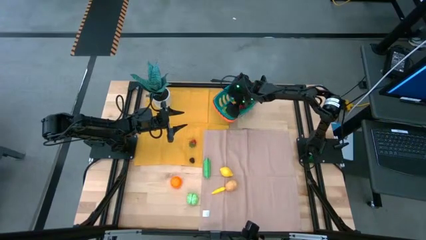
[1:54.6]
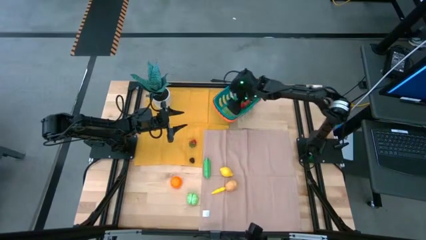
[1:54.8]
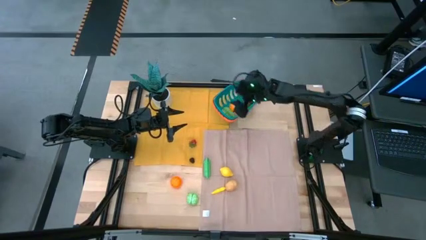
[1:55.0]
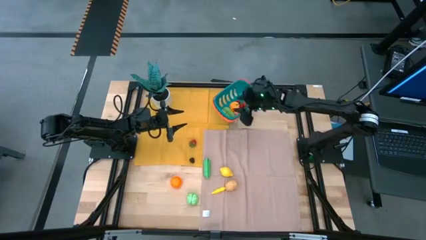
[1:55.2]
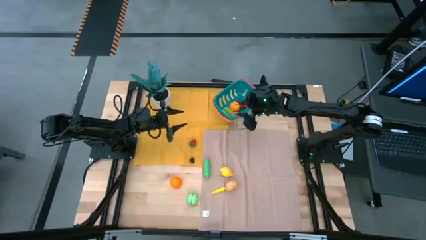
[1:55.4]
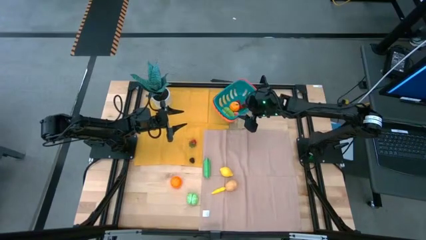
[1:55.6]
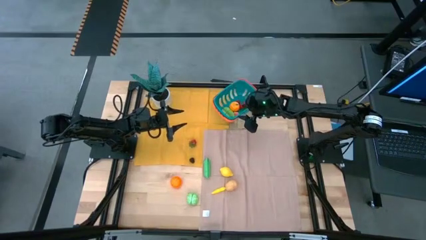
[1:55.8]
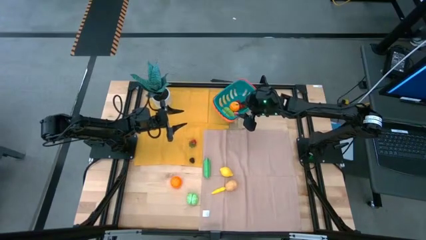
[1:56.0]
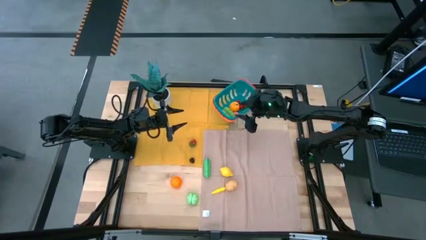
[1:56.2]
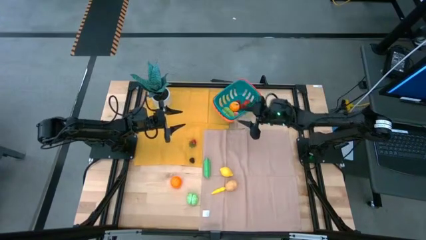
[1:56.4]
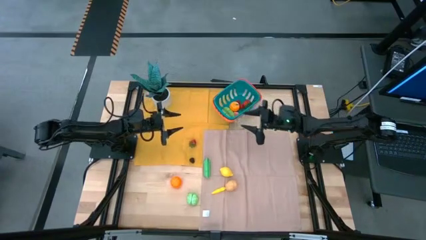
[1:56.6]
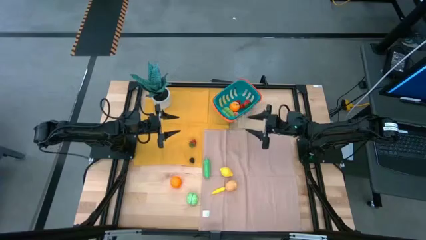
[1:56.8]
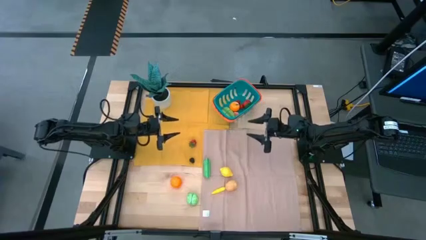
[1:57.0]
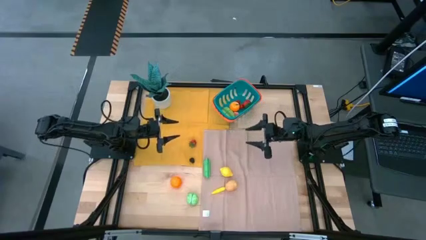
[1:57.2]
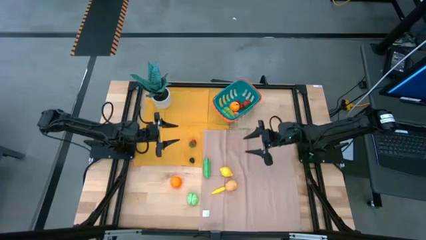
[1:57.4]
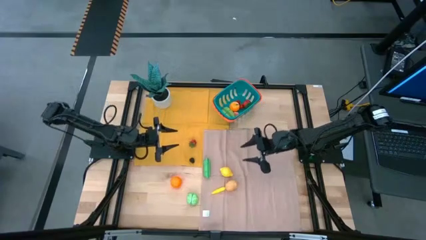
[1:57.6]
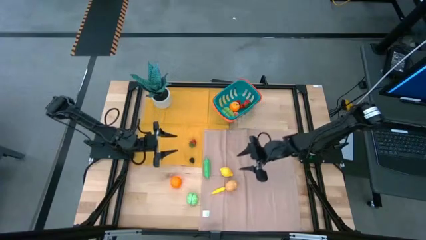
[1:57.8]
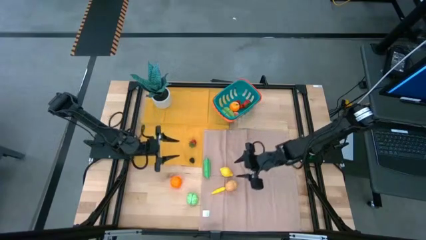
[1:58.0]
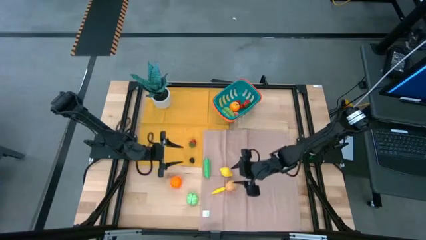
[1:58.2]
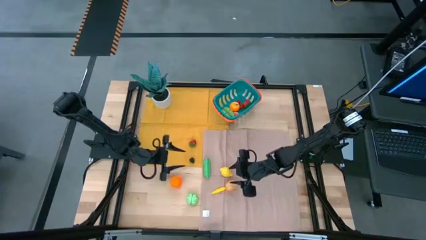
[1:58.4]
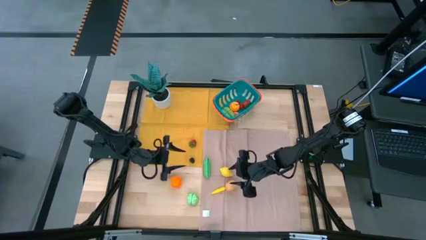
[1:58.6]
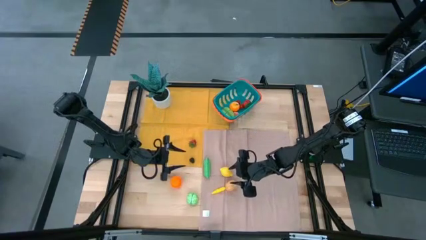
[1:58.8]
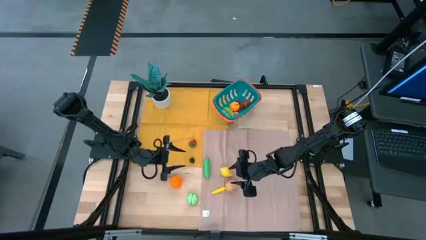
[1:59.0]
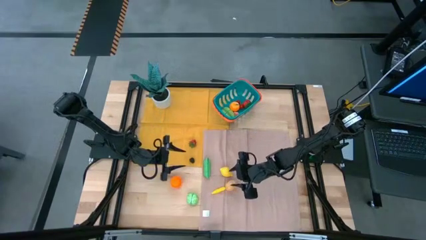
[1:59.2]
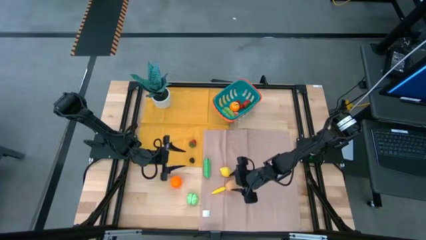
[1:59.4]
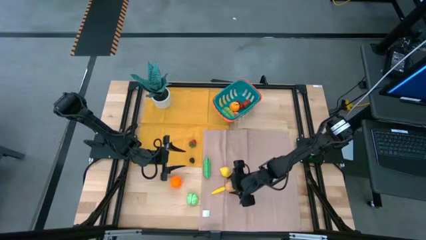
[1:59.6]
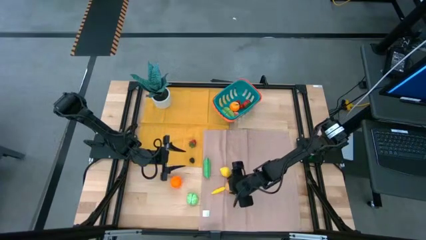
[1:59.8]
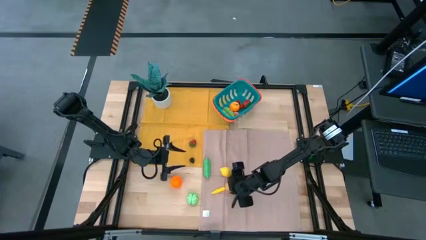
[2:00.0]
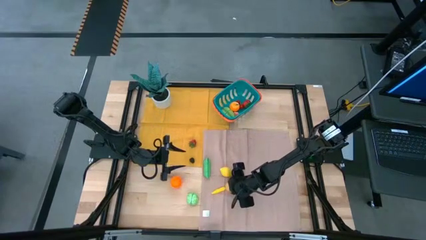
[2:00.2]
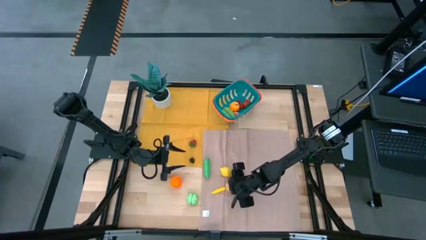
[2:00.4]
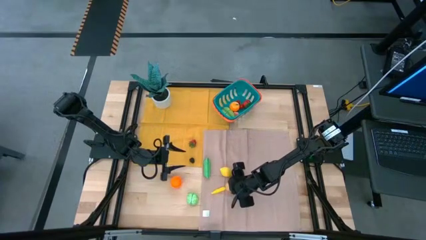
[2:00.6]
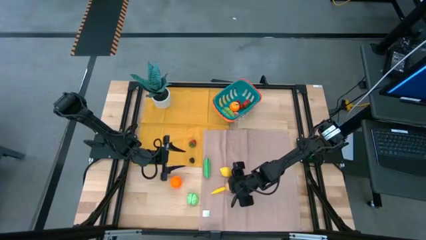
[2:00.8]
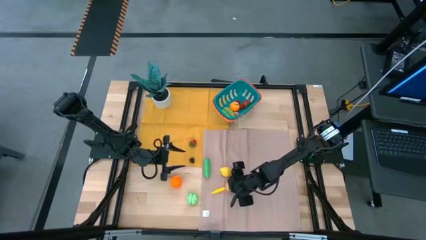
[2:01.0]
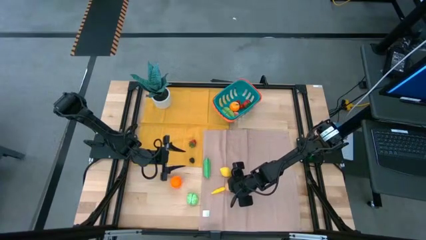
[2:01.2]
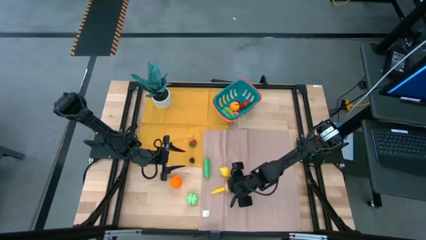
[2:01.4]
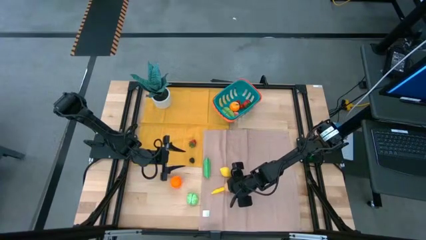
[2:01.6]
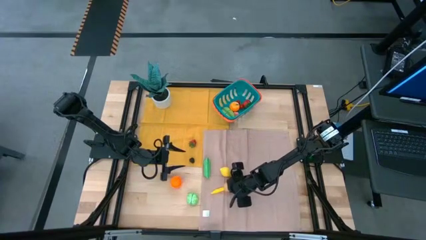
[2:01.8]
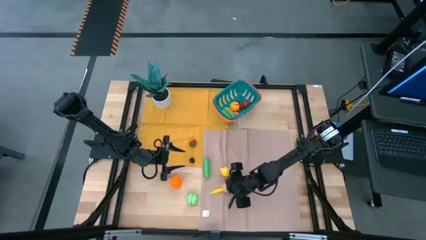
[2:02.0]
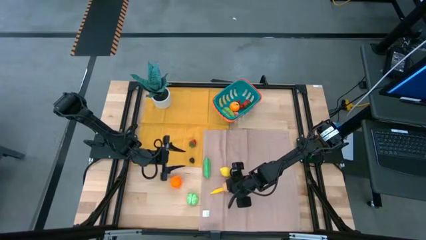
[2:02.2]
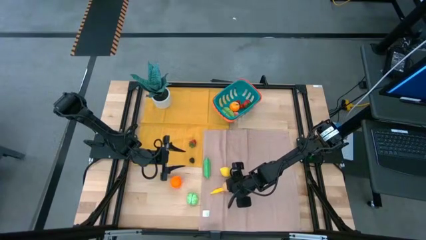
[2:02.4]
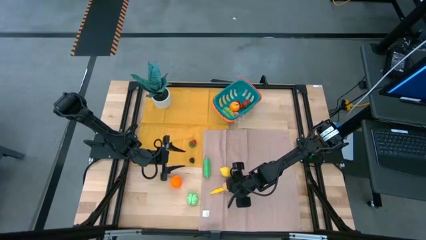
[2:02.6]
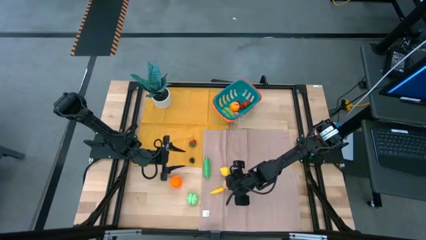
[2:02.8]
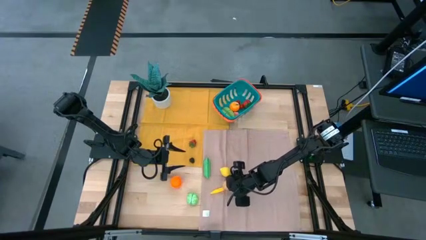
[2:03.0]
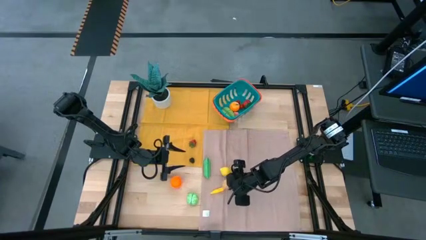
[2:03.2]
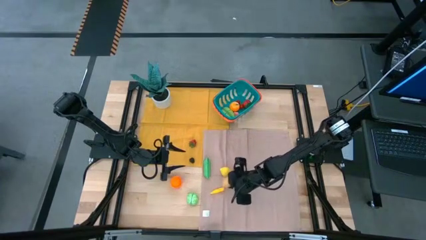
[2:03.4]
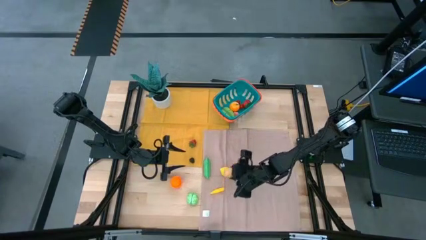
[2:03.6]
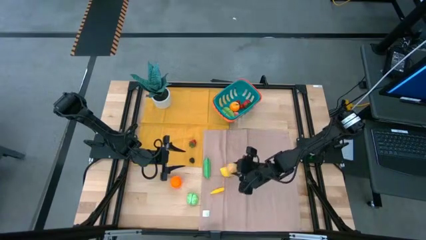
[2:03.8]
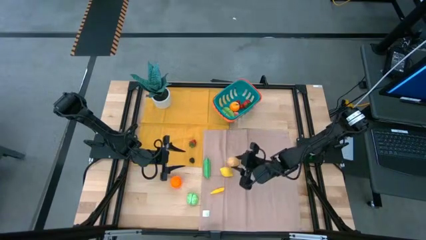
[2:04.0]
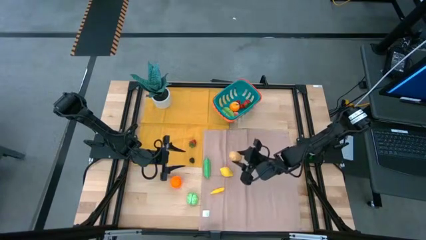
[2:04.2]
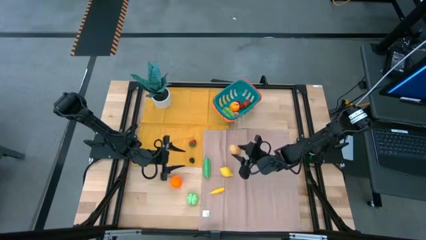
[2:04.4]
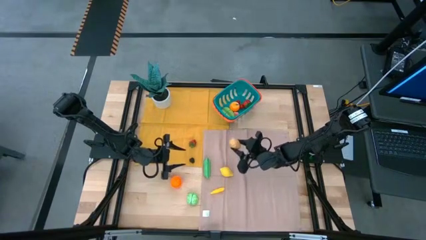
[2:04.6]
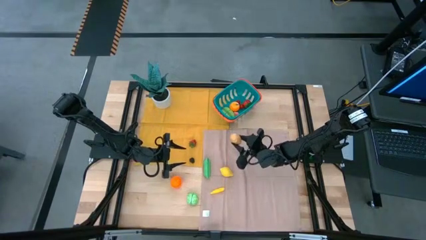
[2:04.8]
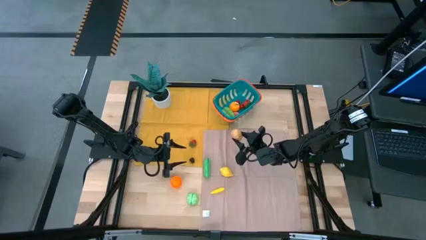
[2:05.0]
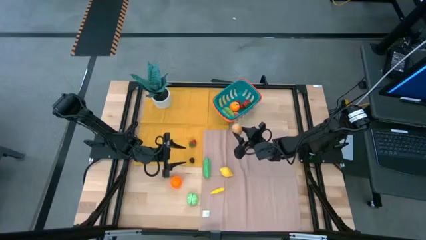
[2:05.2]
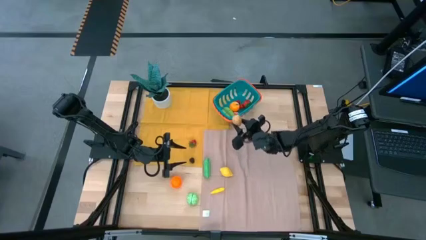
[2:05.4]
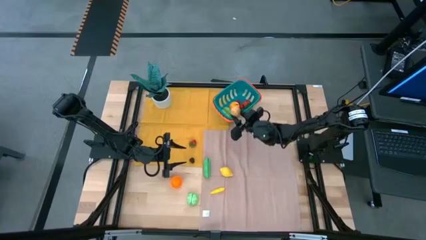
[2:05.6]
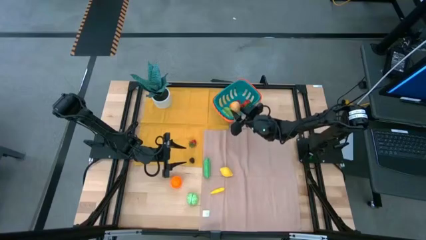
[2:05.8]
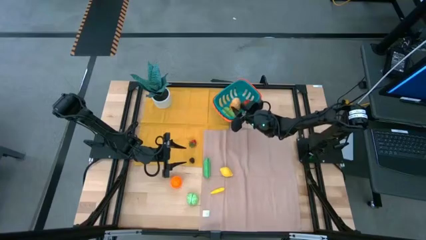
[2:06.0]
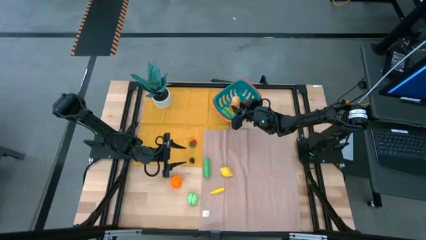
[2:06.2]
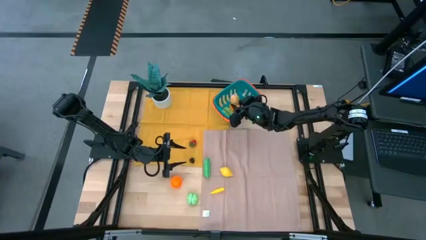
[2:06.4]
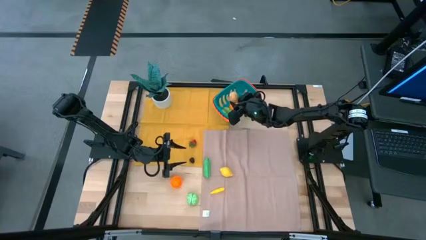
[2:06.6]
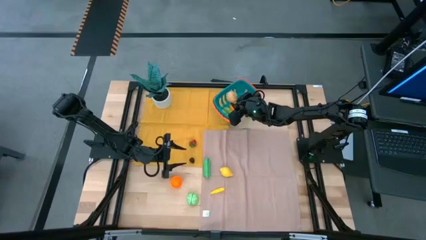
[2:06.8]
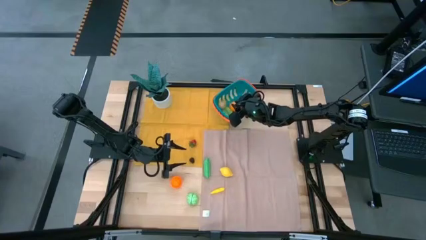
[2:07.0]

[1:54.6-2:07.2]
Task: Pick and placing Produce into tupperware
Put the potato into the basket

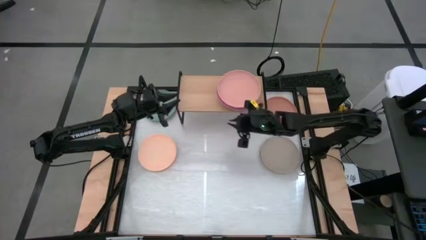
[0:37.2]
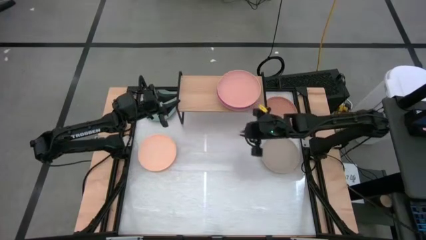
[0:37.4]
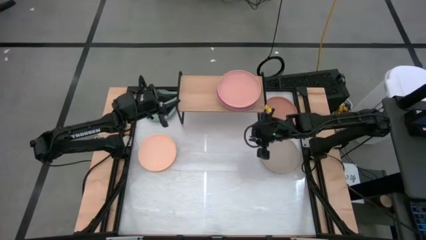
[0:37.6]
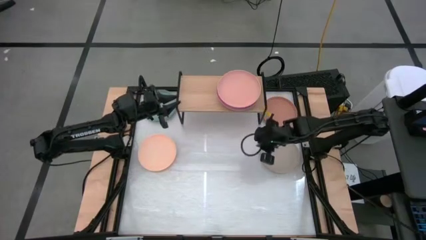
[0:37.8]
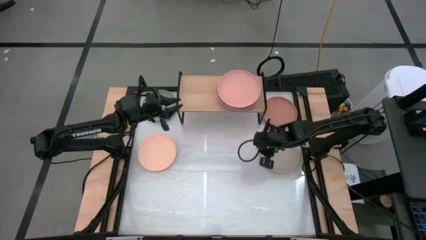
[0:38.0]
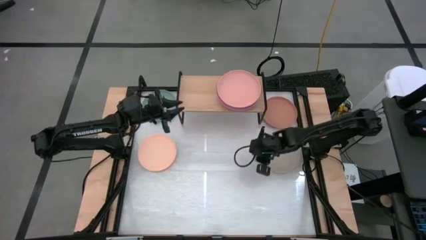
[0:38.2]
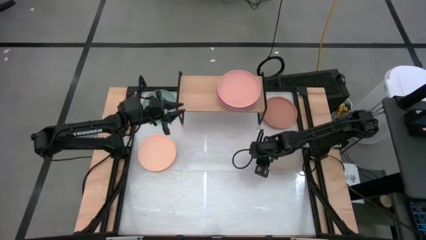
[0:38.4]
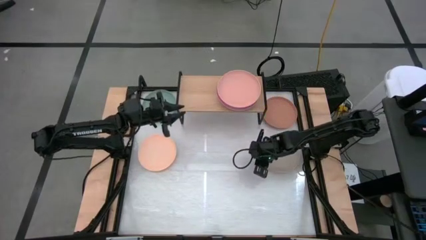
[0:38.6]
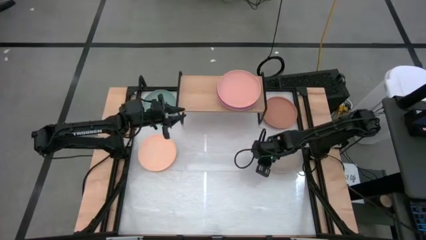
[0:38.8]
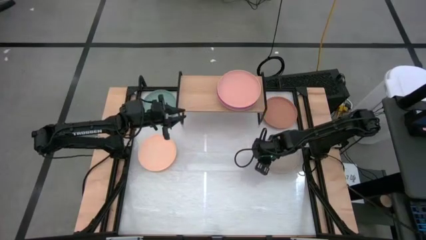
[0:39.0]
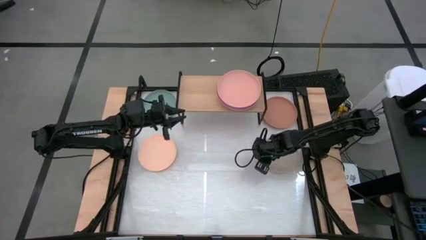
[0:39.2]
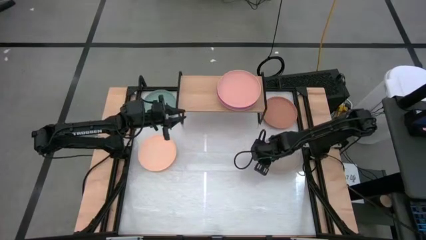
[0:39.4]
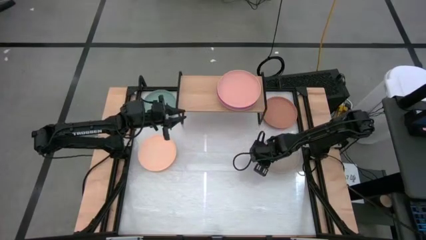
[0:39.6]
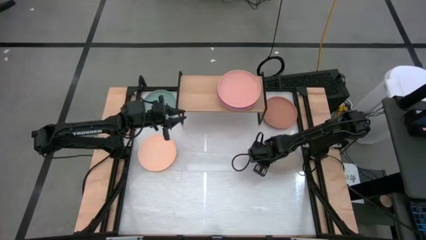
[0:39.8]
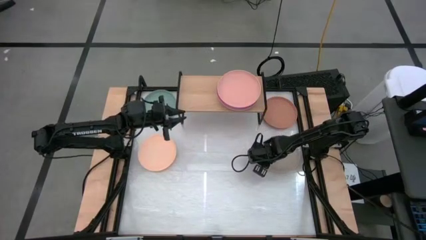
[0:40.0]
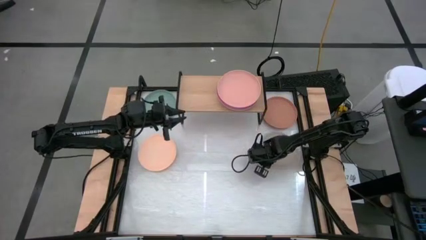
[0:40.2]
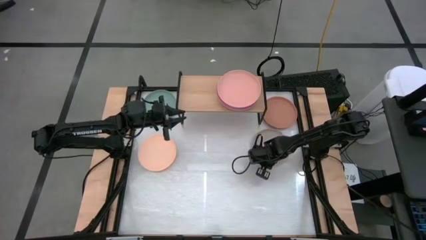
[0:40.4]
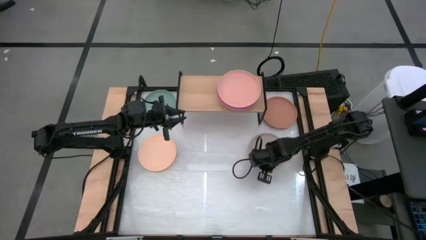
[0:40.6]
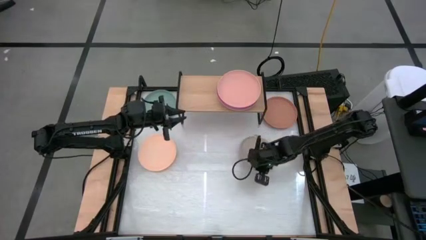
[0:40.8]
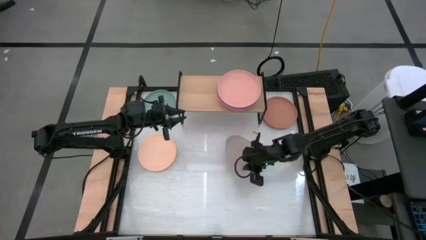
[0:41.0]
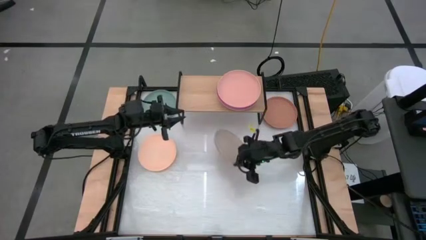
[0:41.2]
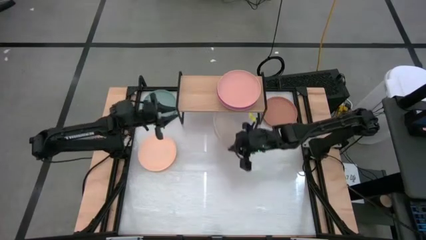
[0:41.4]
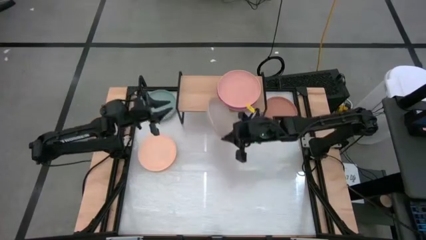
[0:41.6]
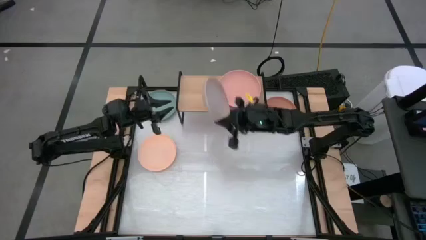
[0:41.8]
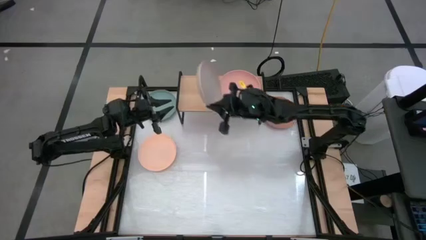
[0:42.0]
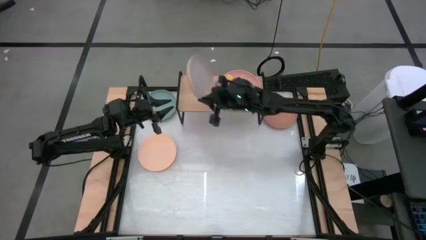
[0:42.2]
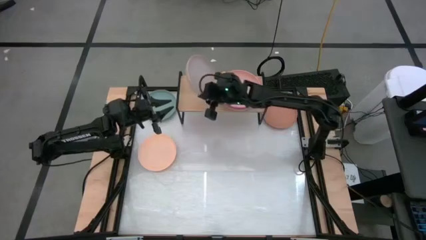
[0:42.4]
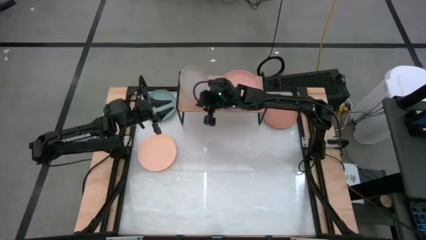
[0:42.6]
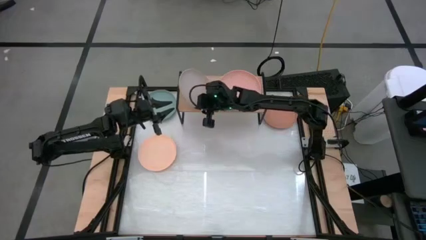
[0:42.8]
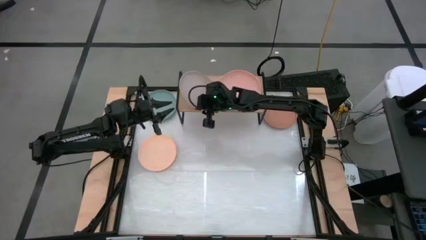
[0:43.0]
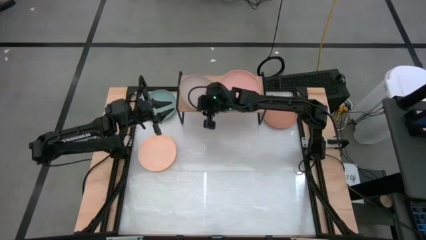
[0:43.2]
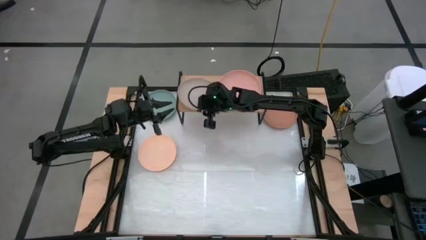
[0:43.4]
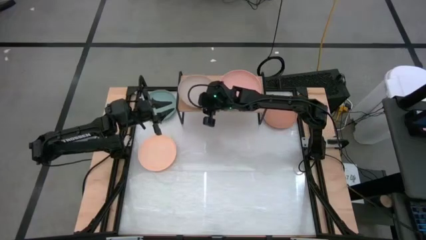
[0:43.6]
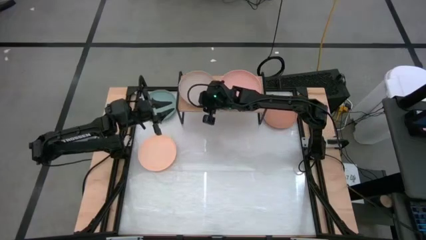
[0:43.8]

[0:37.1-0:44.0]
Task: Place and stack plates onto a shelf
Put the gray plate on the shelf
